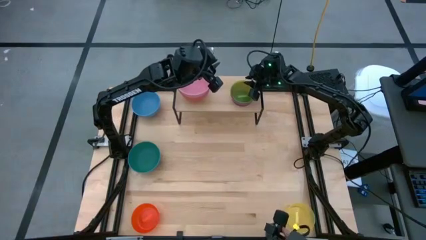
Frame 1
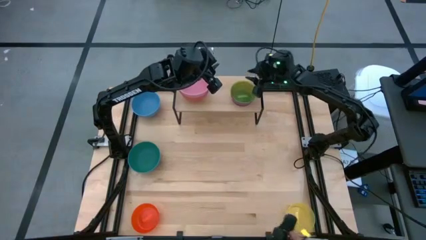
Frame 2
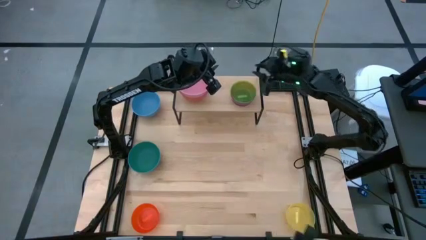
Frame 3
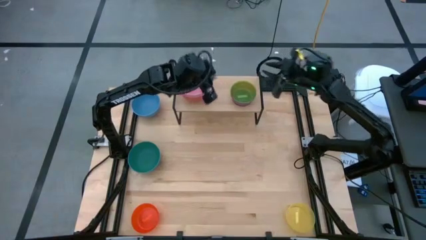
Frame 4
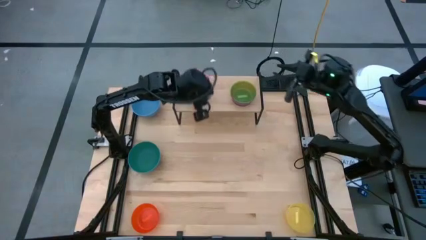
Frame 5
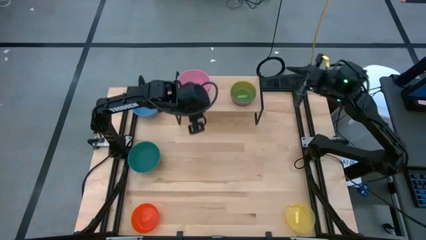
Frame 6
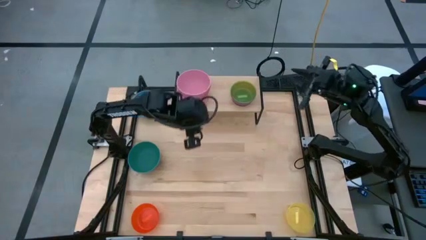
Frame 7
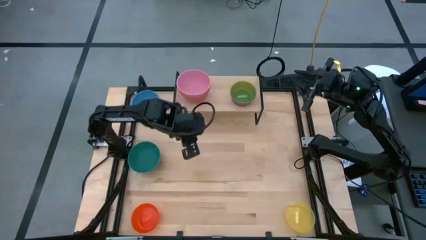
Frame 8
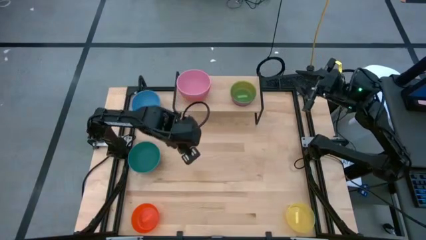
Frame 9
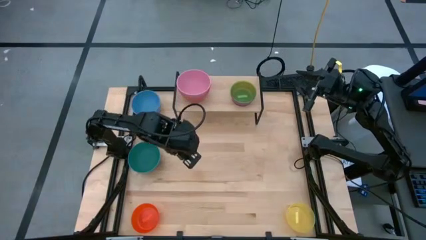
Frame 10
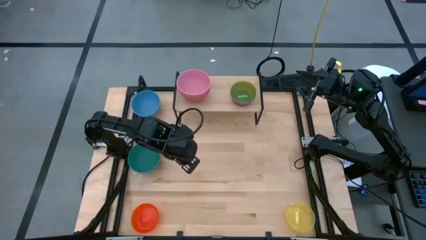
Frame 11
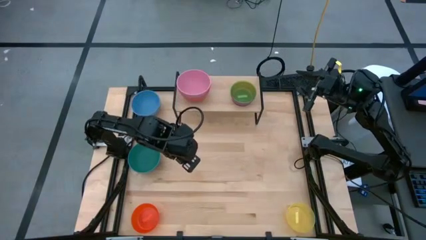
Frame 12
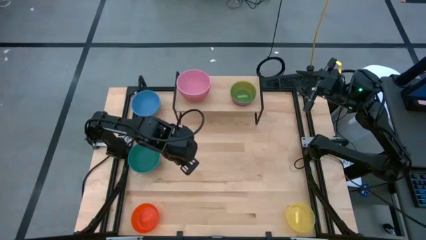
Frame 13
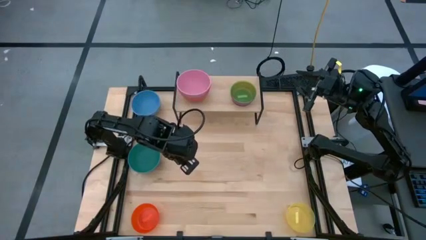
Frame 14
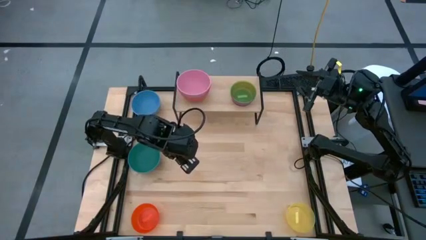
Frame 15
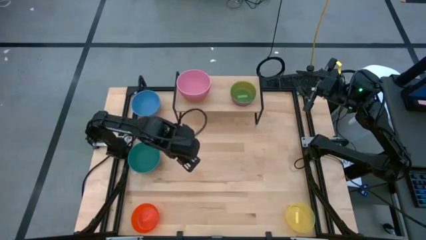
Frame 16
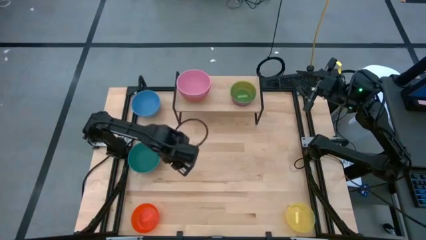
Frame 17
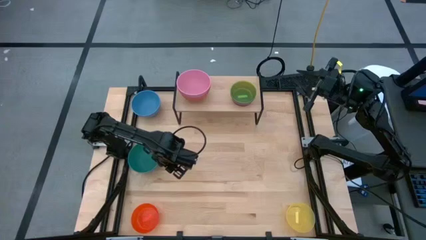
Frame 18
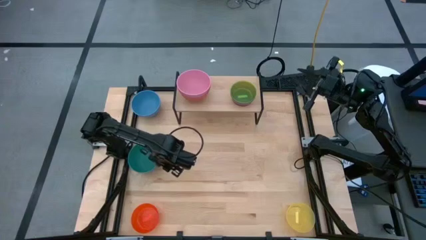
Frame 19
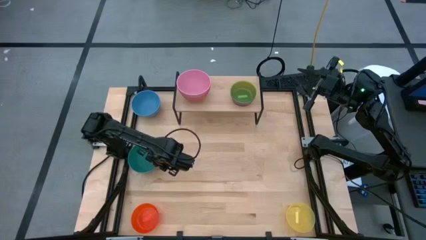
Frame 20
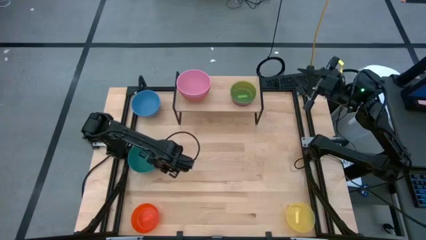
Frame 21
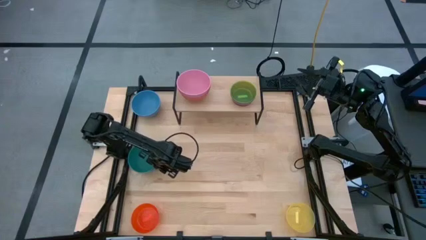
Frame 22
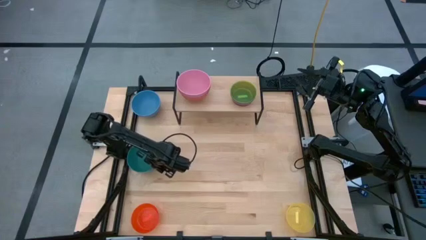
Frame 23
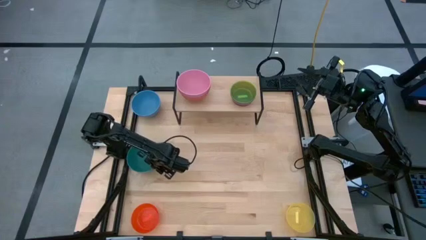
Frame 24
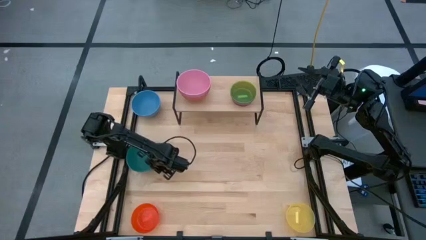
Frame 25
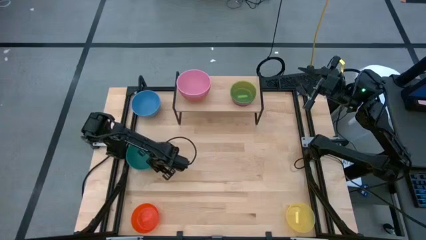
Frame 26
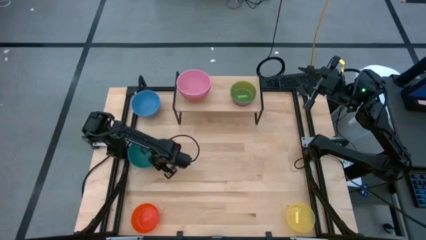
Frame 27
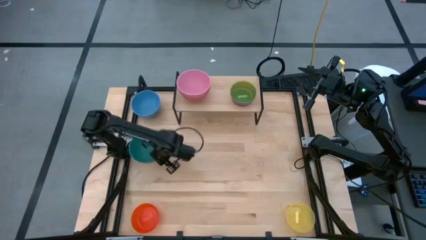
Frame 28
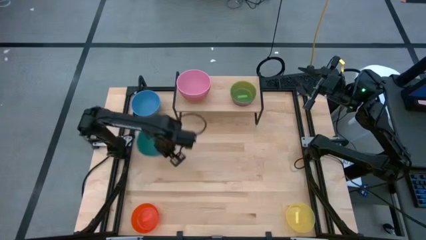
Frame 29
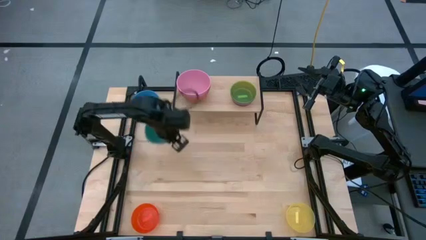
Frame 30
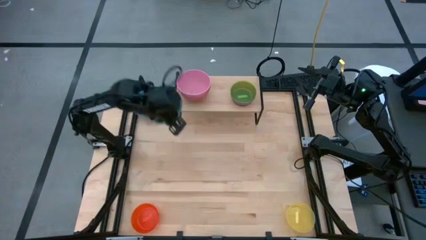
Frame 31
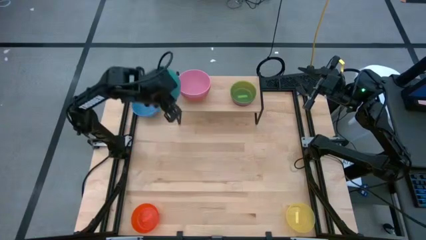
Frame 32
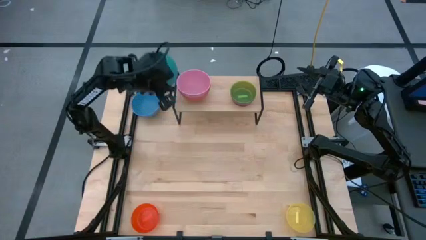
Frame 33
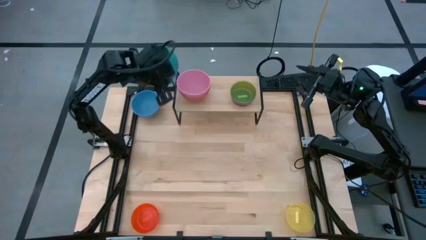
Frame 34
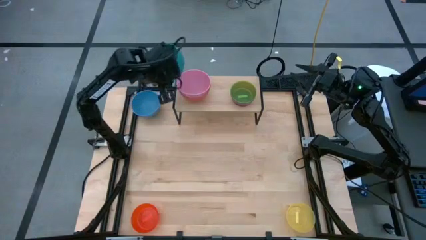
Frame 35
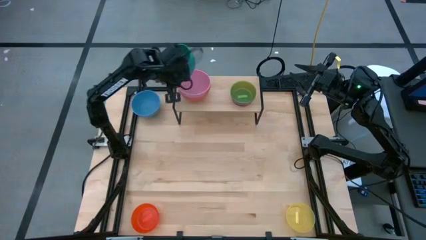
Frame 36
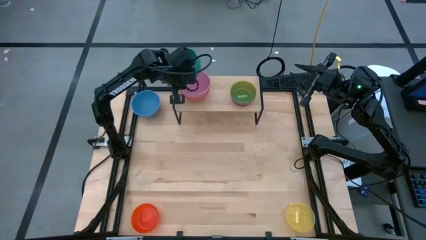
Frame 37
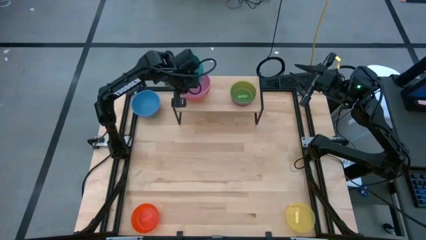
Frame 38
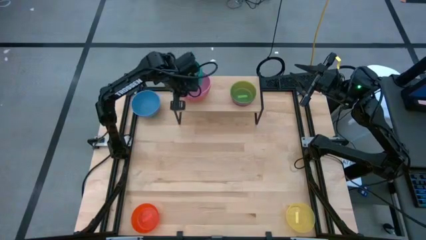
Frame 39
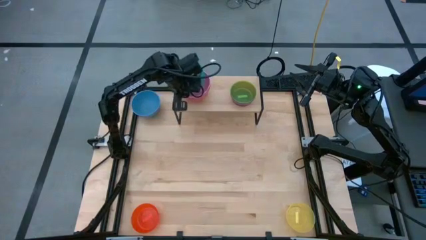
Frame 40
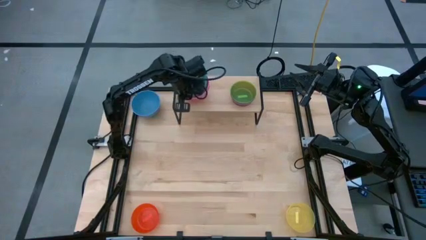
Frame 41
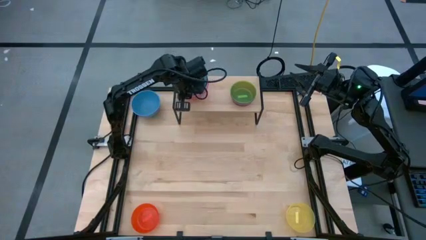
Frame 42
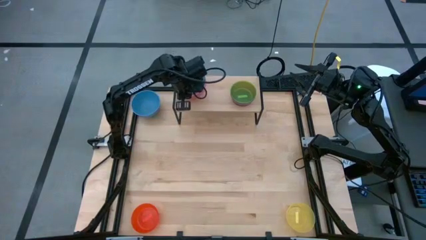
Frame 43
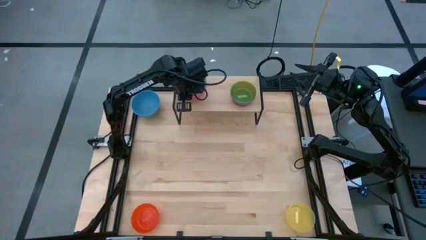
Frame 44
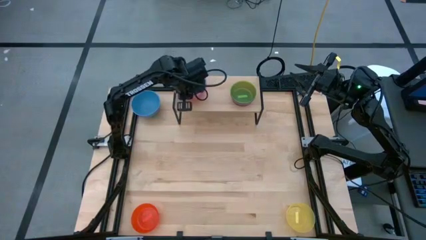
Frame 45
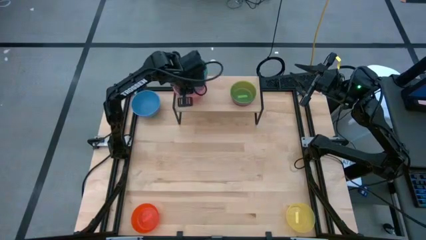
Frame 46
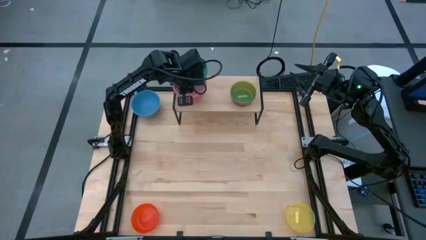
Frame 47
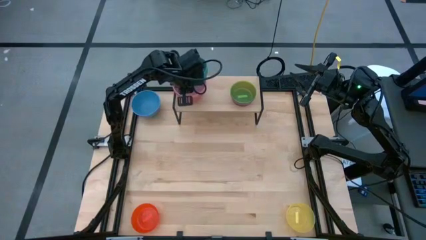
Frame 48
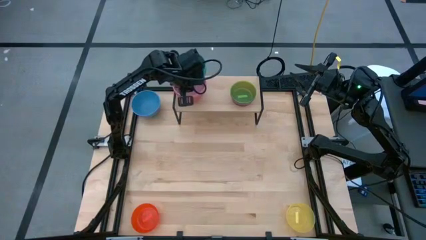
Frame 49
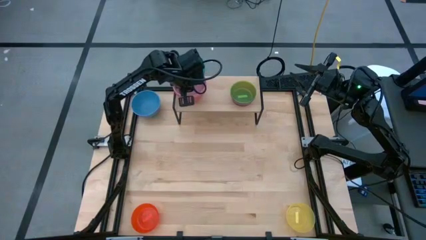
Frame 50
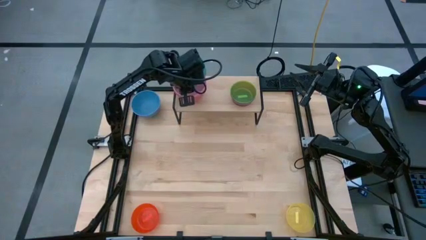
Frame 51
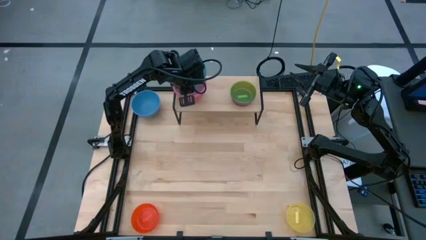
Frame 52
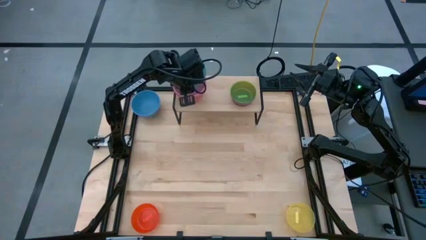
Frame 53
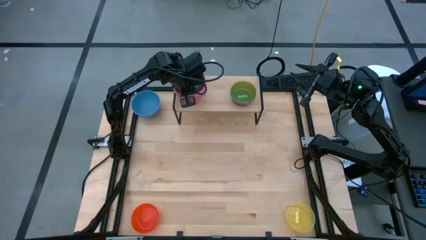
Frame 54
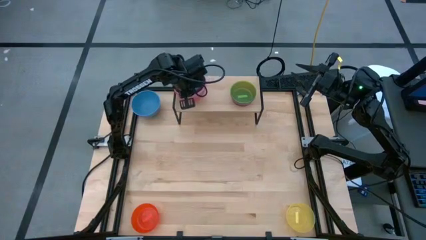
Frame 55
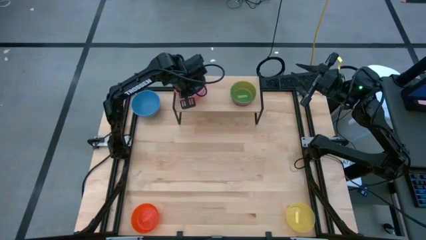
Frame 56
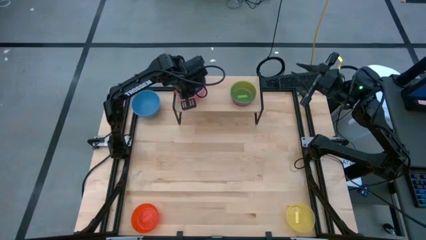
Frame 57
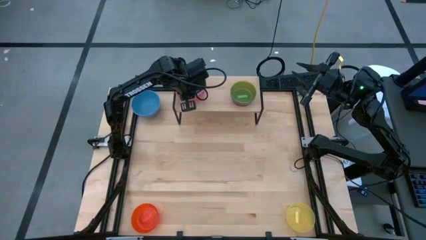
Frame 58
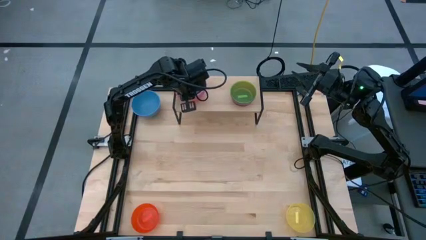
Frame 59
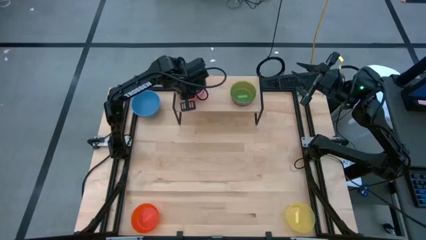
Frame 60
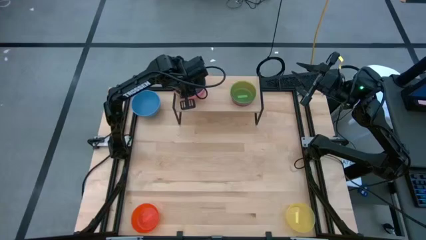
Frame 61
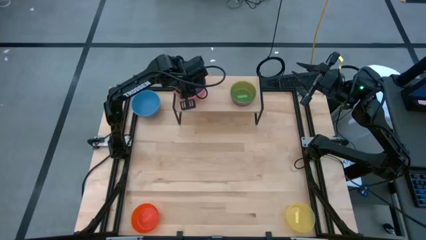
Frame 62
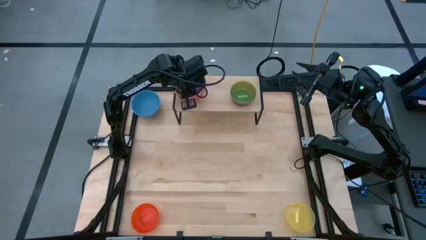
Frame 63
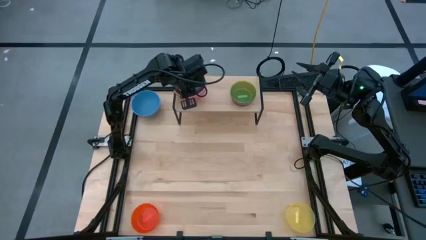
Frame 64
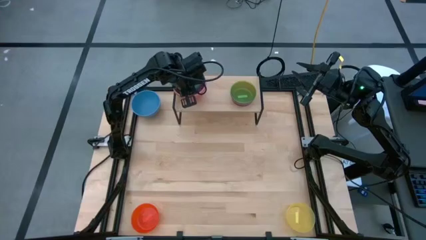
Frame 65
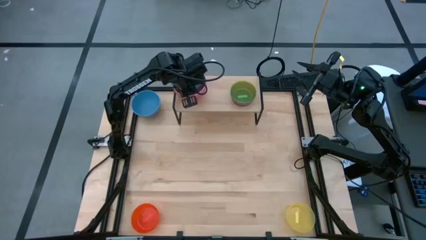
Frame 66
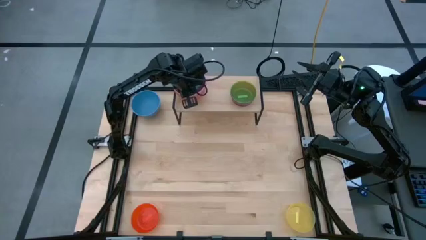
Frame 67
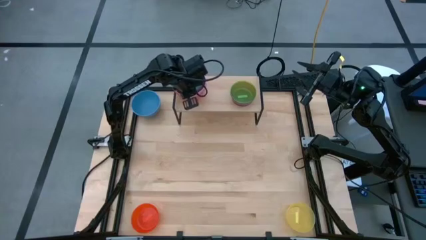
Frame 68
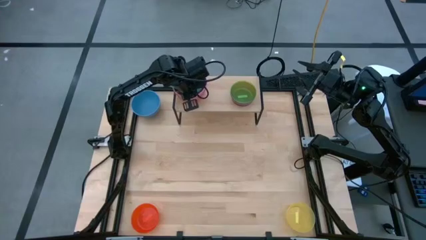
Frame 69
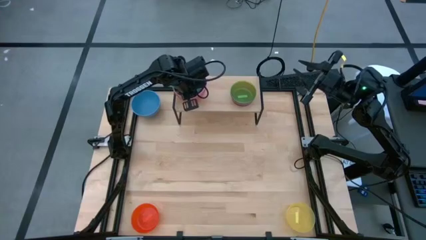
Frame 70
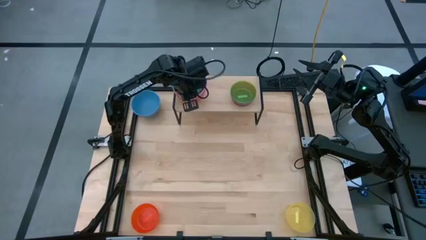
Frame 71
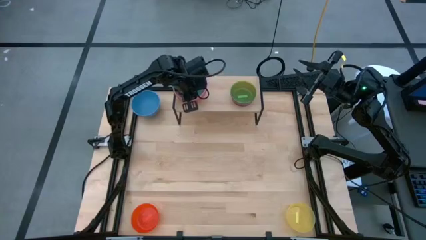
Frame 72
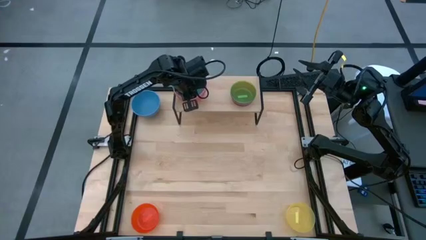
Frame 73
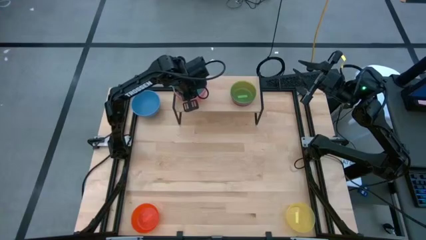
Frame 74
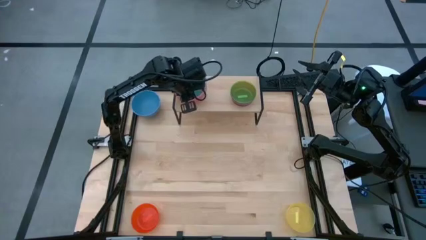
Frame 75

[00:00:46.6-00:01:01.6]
Task: Place and stack bowls onto a shelf
Stack the dark green bowl on top of the pink bowl on the shelf
